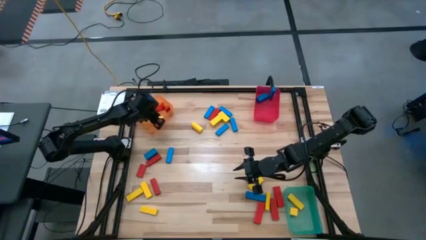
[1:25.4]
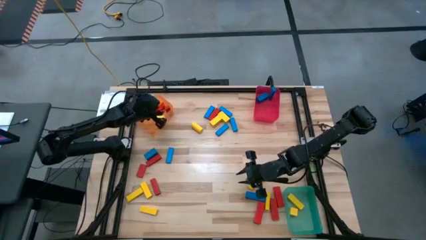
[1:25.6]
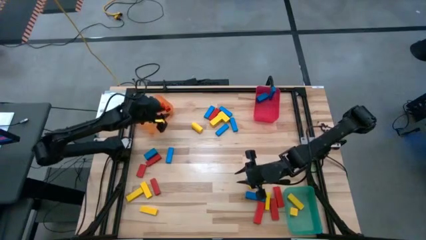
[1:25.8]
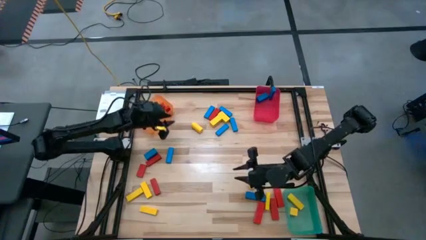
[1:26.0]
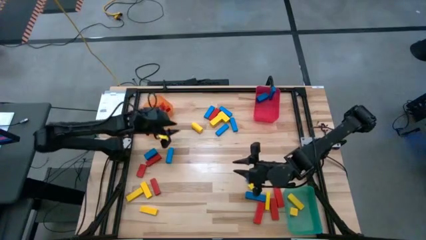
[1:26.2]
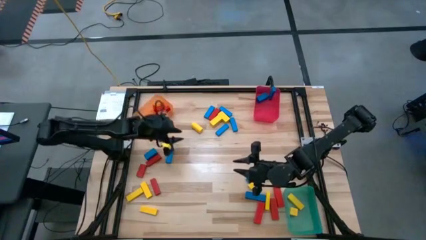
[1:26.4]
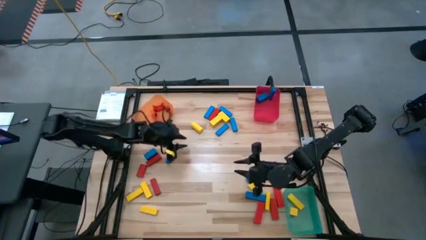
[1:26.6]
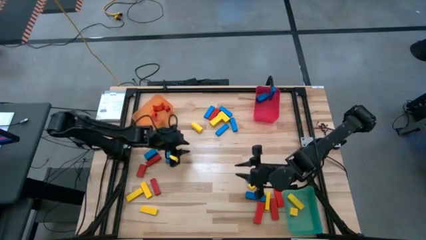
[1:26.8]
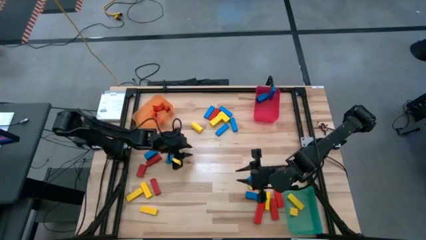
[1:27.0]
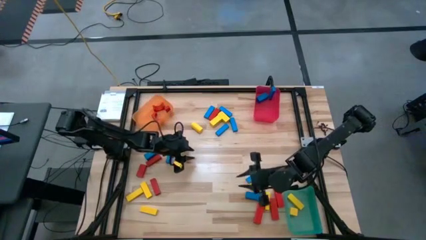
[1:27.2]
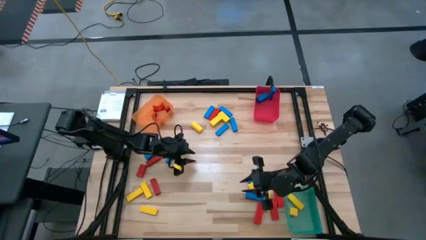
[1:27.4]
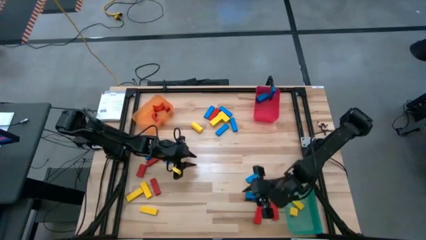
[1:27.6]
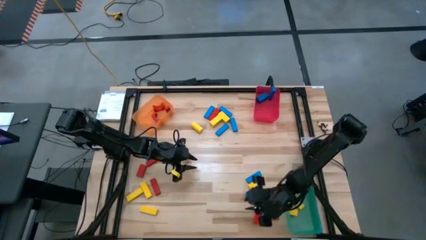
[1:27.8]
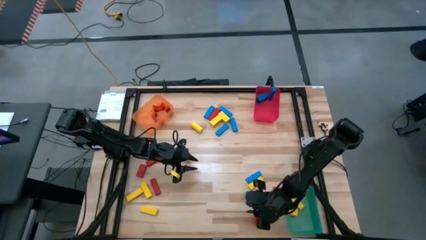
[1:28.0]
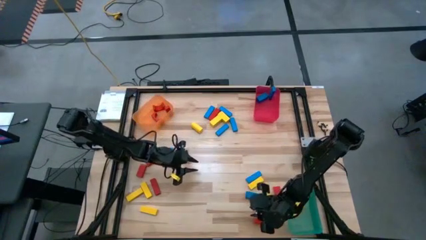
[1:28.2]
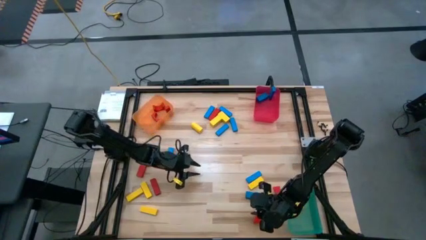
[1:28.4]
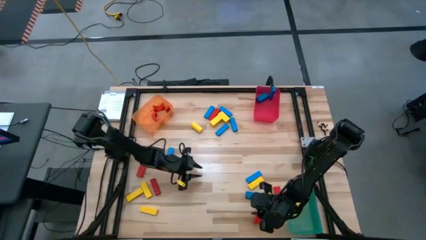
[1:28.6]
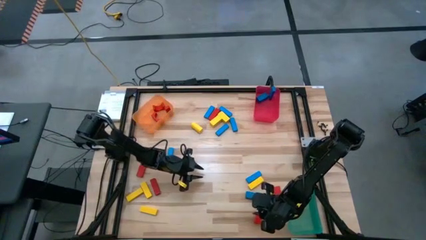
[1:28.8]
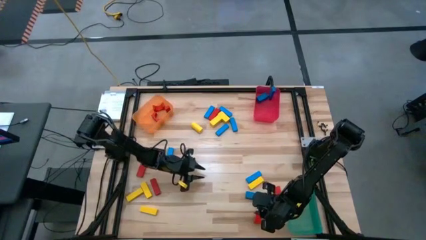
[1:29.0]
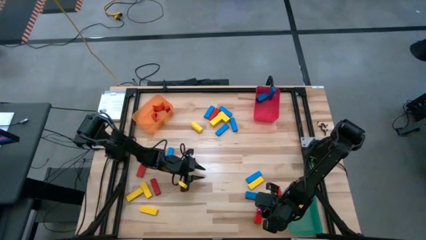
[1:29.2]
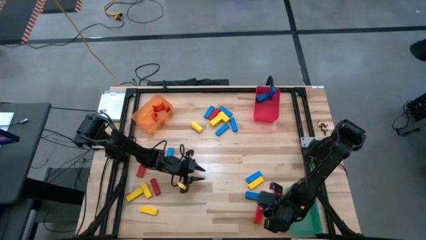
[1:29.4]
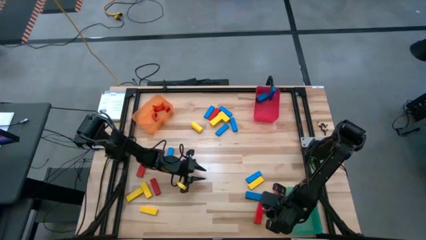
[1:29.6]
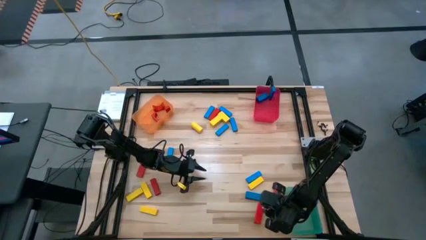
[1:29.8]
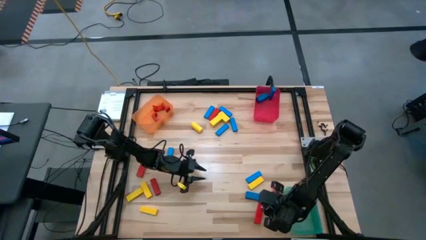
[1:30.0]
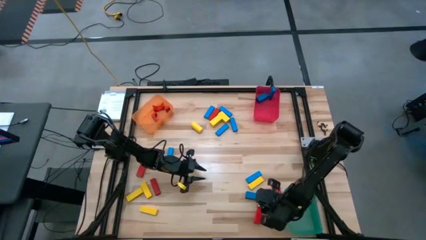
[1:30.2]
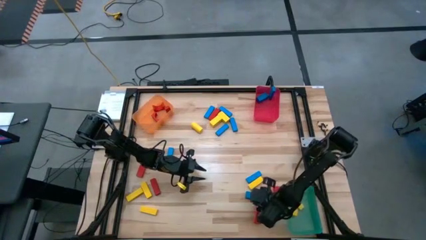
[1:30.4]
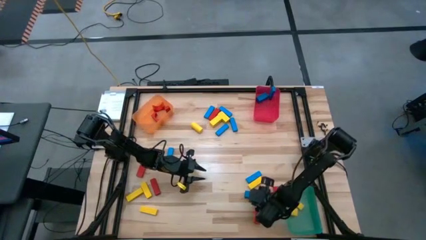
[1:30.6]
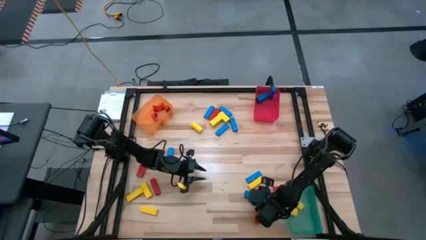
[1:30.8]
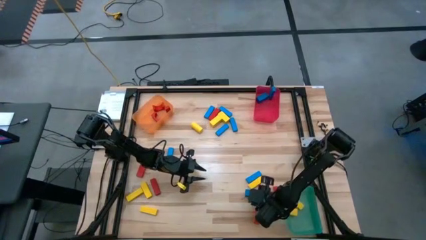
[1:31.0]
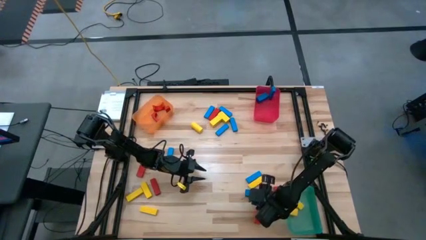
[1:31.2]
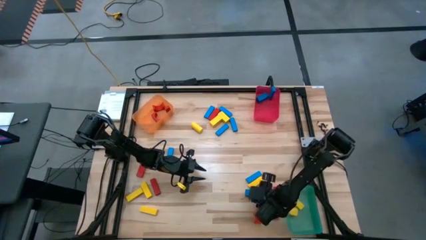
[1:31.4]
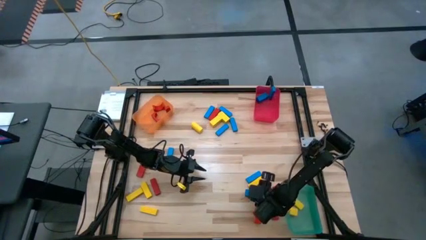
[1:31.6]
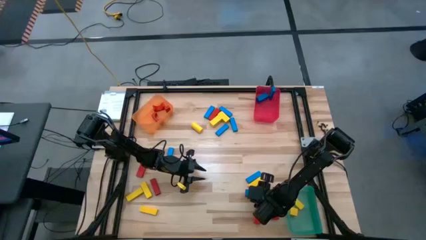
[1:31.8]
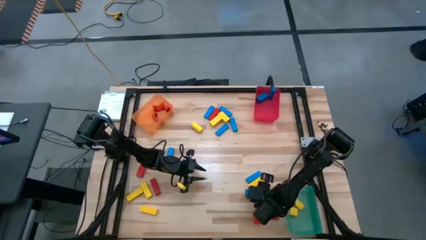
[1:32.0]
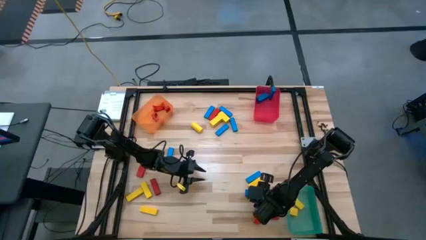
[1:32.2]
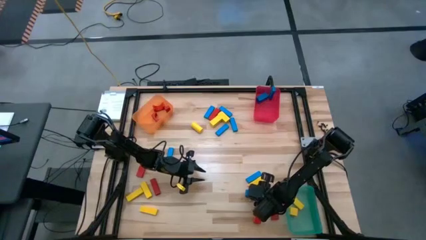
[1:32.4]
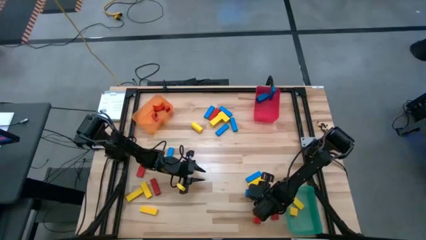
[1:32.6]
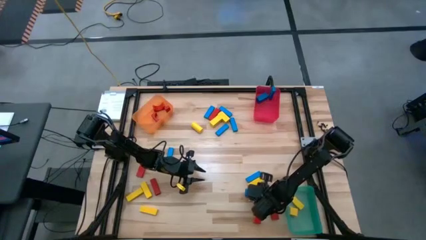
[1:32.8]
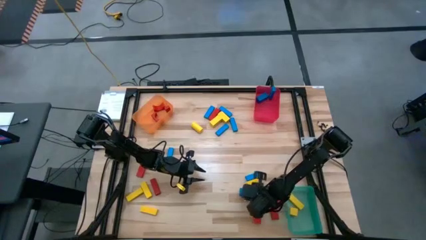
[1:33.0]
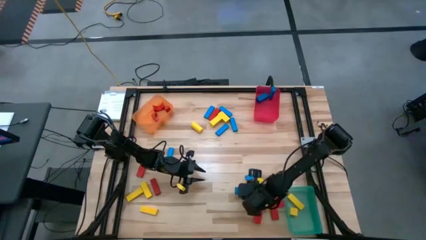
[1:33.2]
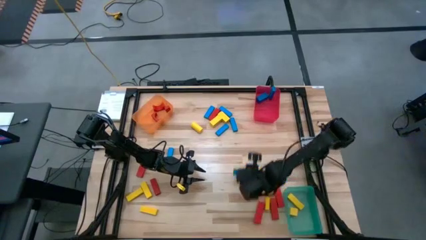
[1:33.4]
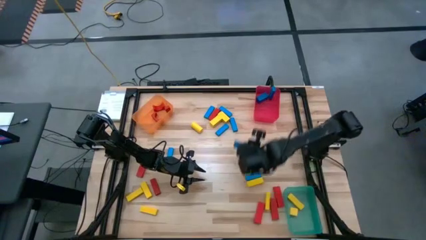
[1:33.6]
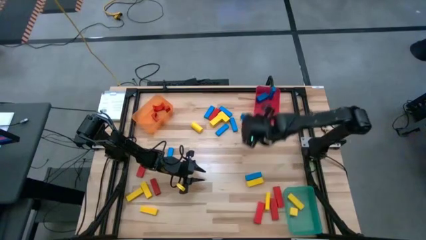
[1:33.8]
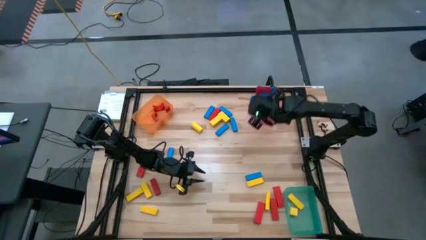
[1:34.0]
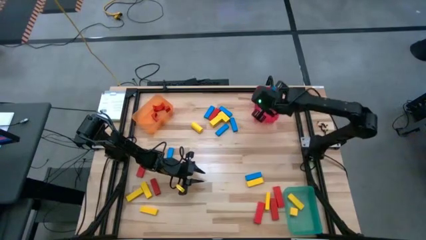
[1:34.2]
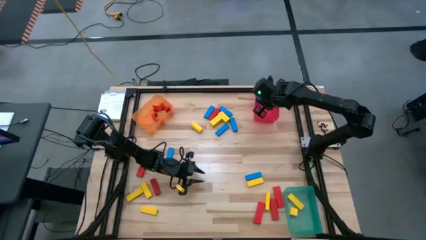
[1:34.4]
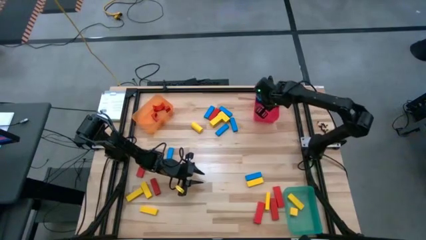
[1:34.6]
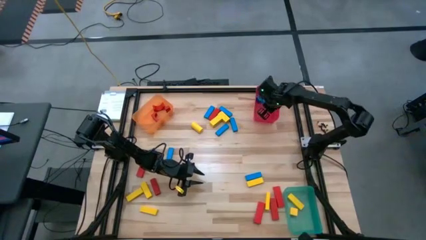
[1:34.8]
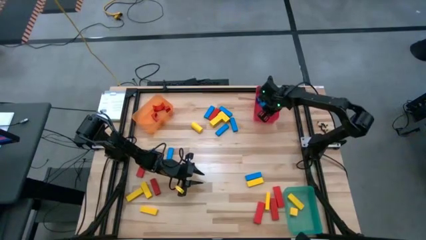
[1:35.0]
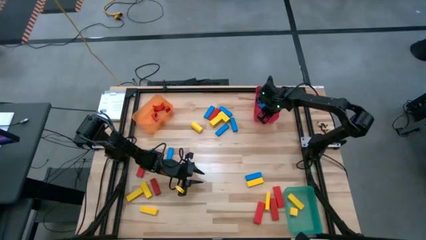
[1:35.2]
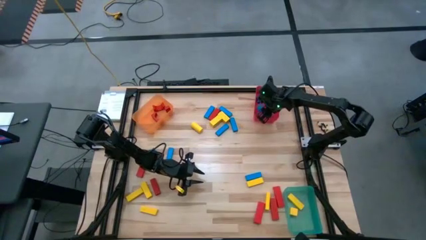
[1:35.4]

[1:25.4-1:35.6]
Task: Sort blocks
Put the blue block into the red bin
